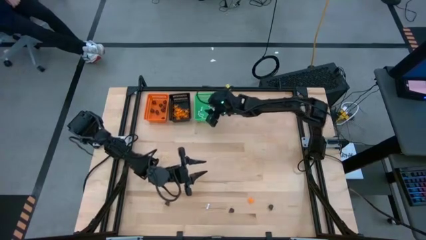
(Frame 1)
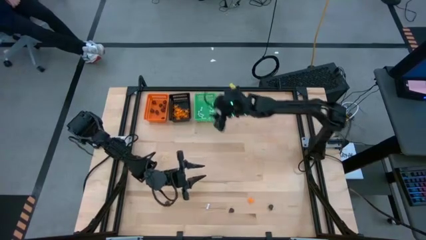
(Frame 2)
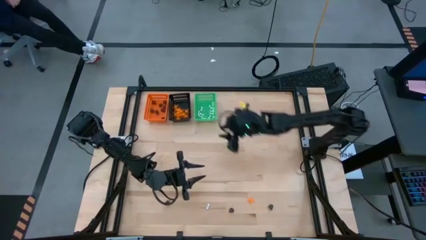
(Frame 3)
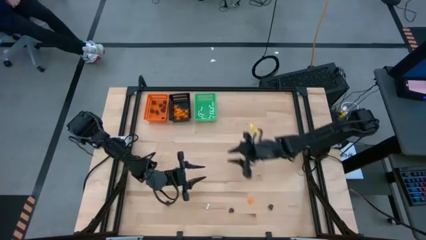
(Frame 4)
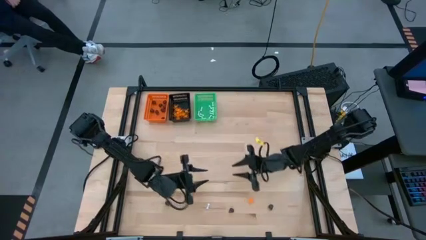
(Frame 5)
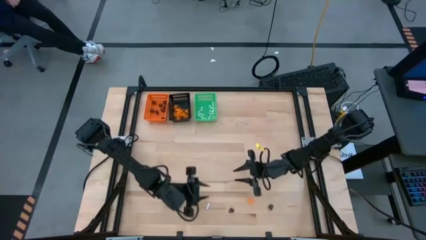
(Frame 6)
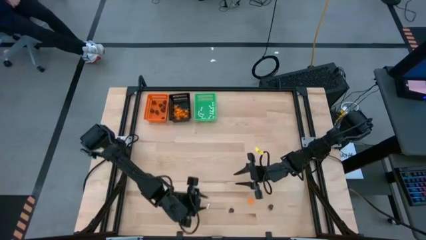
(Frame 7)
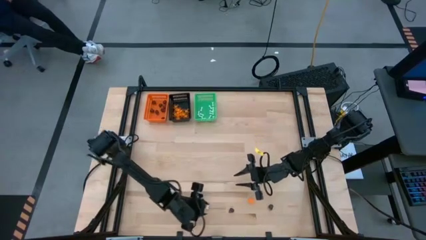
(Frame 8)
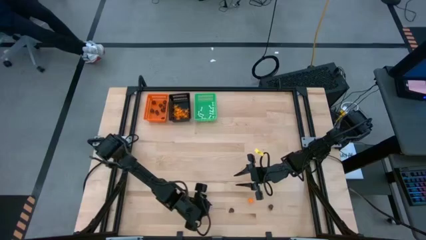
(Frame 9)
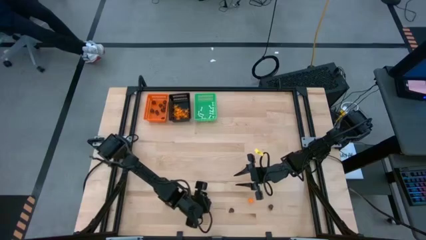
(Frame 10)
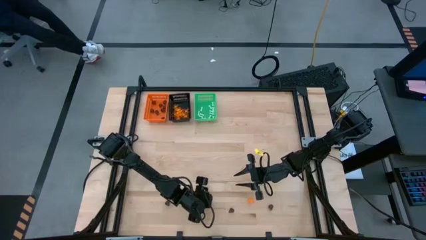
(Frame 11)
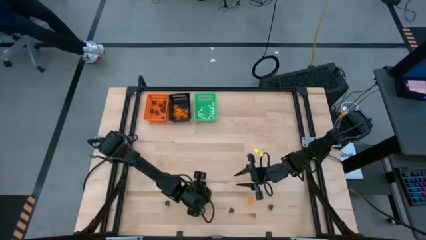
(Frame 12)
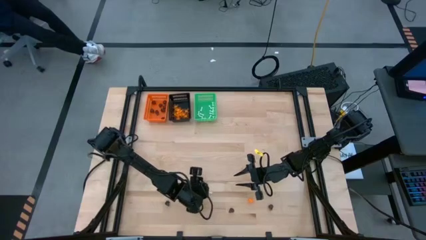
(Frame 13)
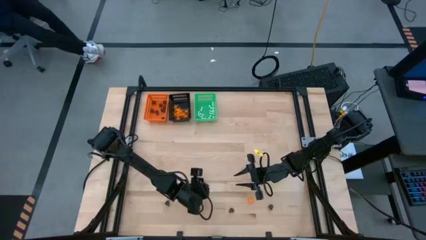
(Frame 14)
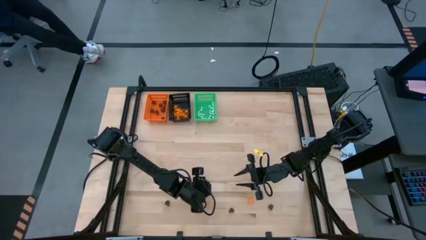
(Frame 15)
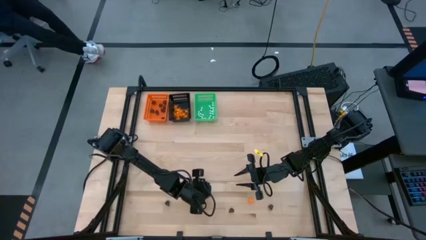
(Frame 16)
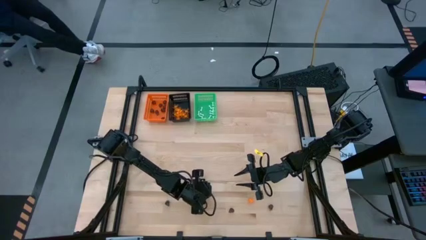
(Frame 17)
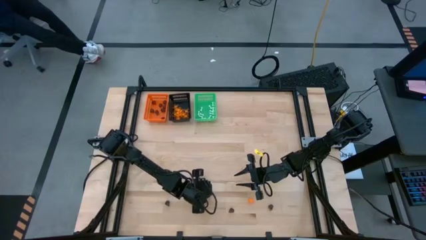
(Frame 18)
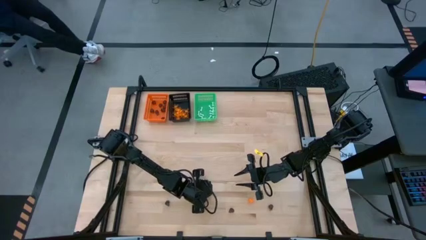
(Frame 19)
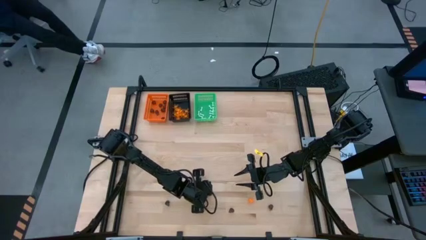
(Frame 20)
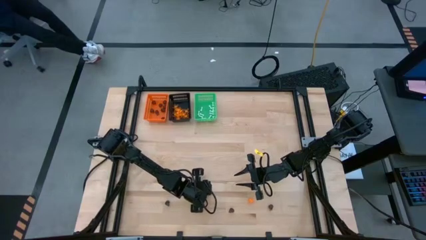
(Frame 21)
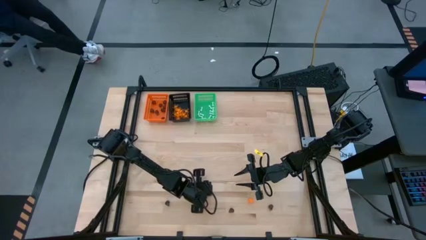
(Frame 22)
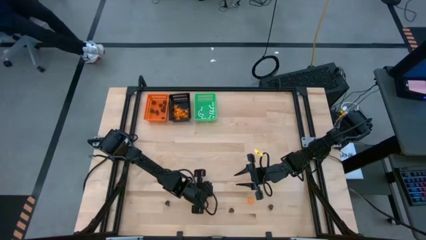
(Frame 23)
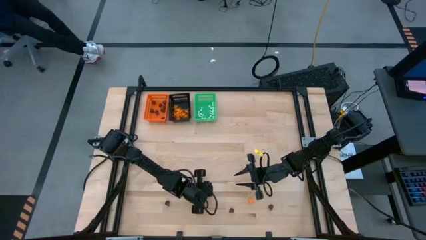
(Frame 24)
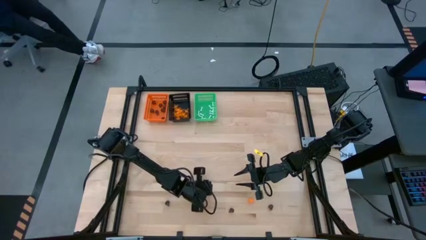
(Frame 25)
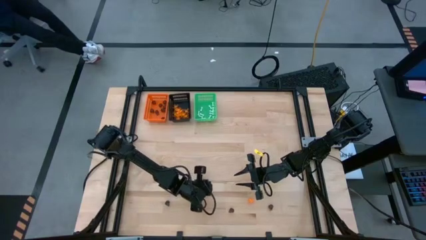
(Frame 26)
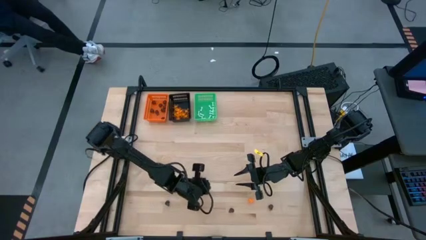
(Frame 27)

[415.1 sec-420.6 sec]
Task: Sort Halloween decoration
Put the white bone toy into the green bin

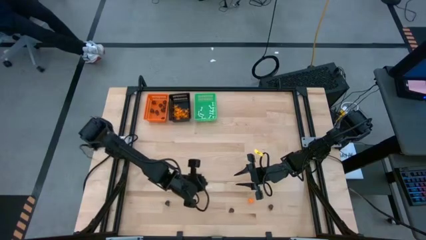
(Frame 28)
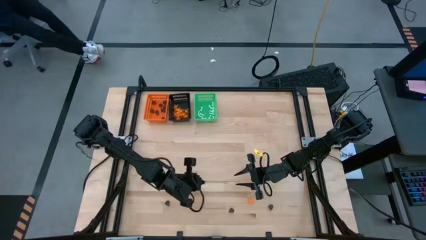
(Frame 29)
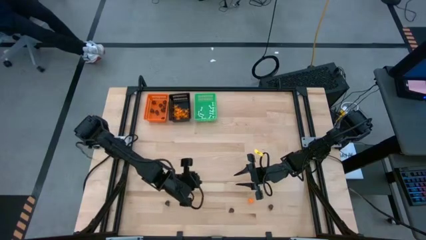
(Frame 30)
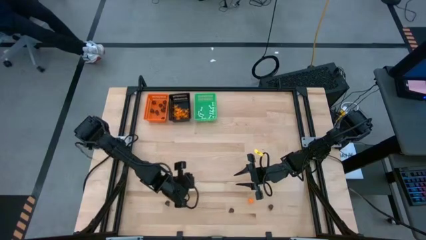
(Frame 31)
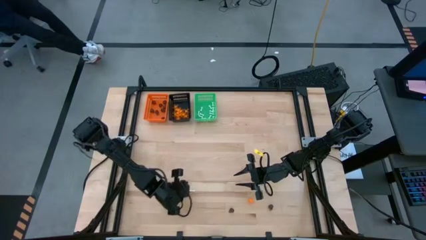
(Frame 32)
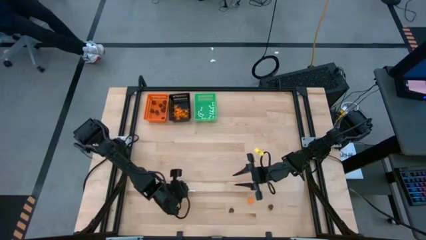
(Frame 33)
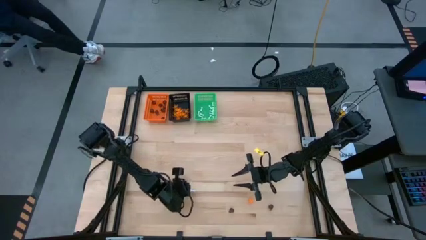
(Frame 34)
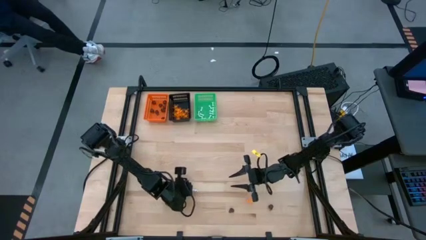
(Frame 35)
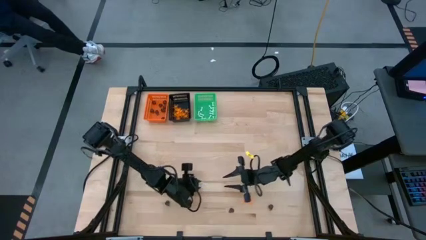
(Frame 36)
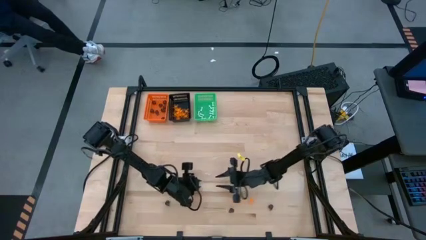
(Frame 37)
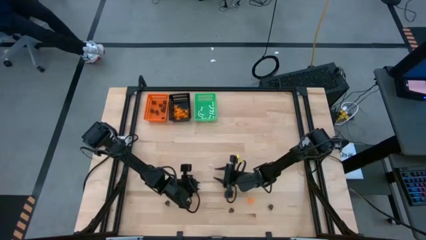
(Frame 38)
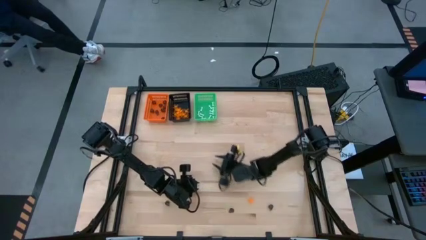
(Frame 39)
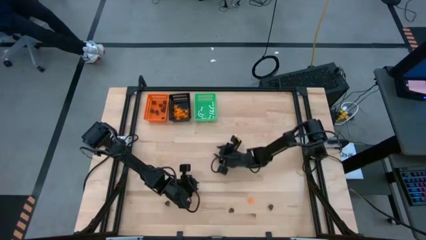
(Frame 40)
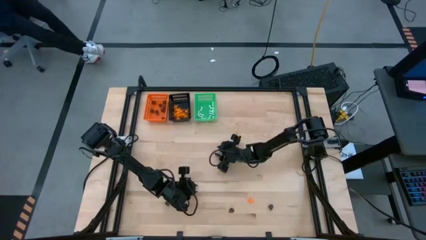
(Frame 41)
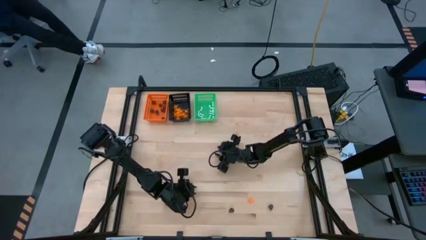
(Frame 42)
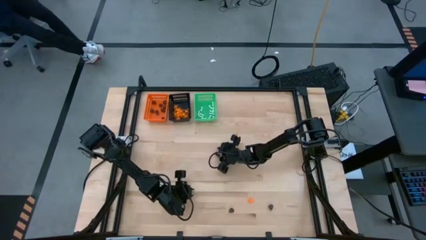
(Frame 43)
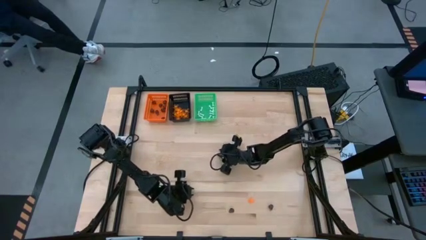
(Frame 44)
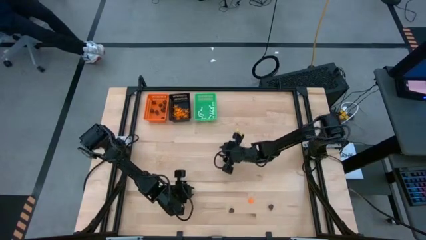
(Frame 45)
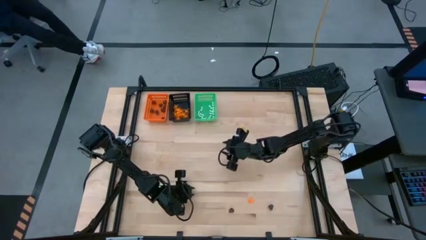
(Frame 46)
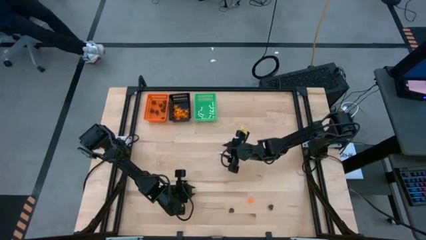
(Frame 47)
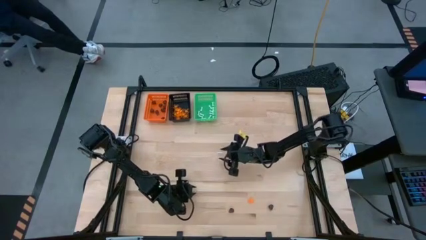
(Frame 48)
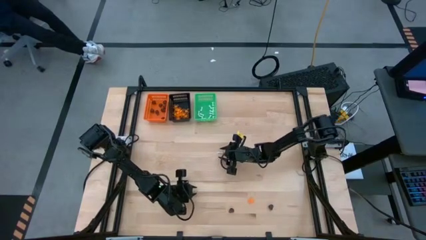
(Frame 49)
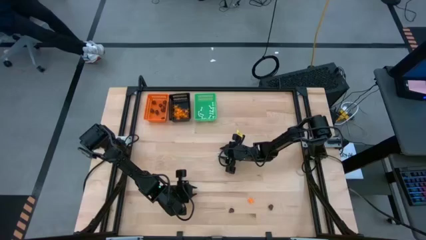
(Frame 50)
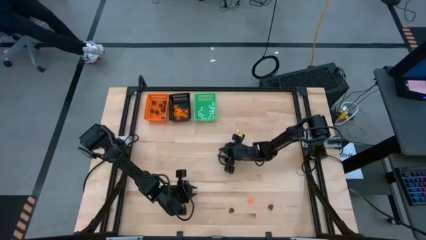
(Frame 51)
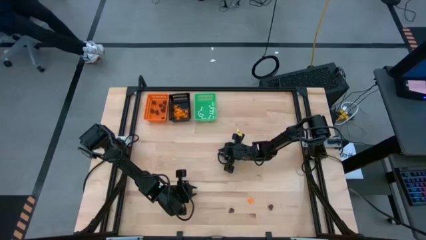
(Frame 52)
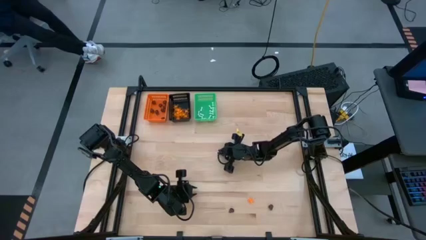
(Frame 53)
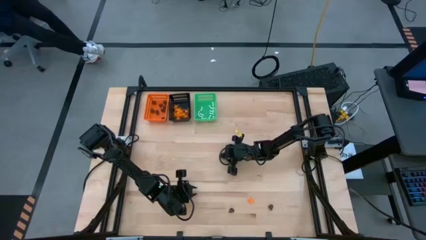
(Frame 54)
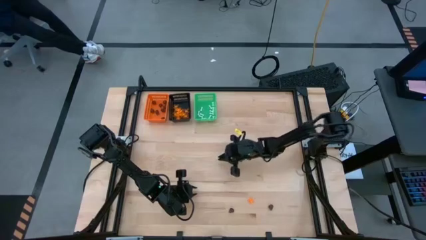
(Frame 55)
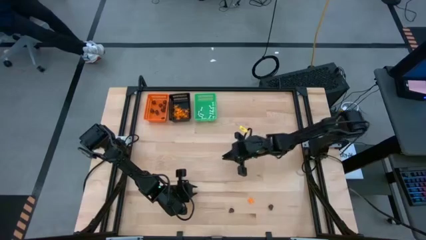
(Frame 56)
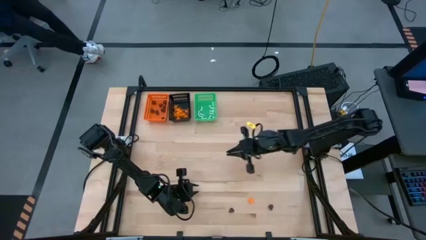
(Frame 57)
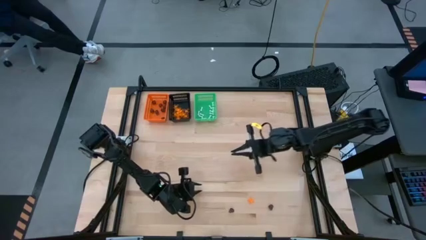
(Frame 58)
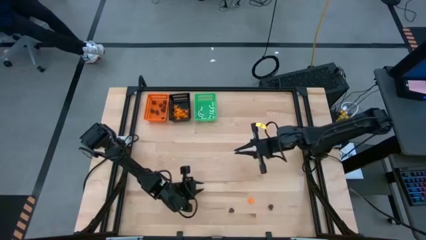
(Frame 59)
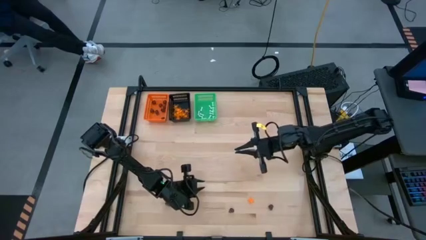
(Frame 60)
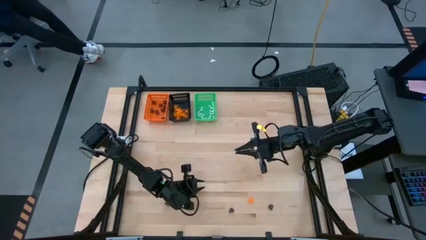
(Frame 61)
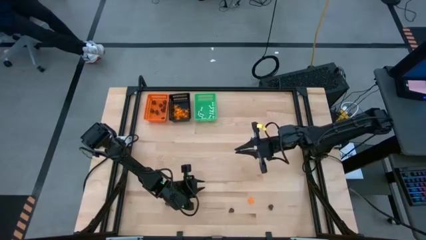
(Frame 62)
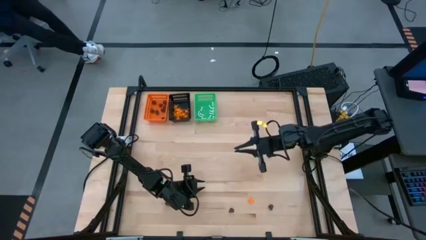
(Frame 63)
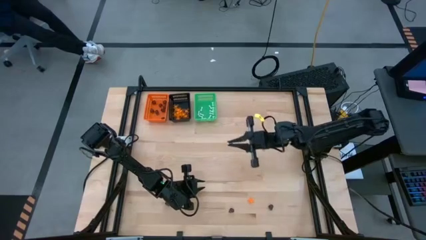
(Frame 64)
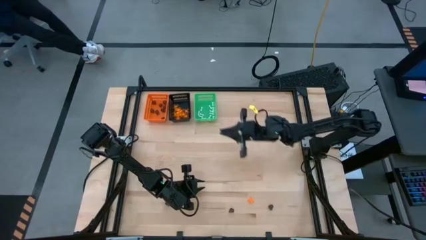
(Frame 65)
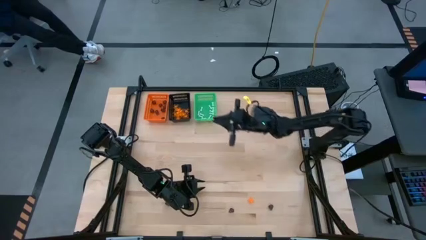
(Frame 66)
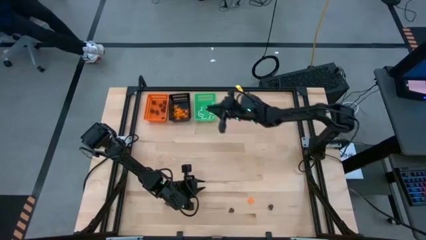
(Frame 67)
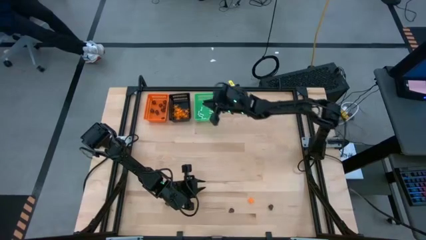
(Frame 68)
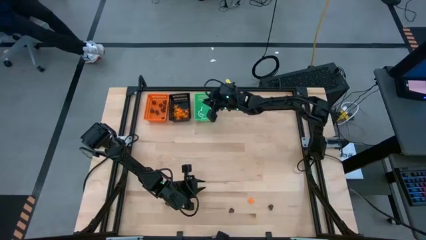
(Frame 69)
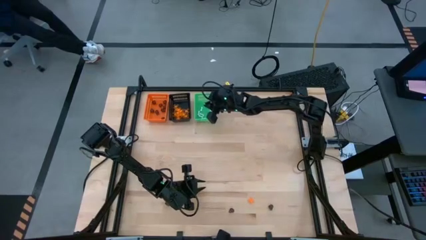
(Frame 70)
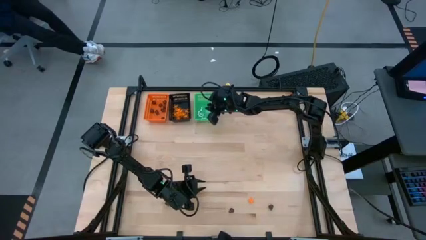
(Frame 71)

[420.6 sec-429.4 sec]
Put the white bone toy into the green bin

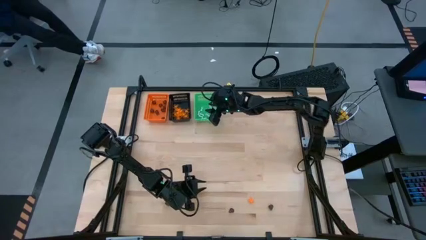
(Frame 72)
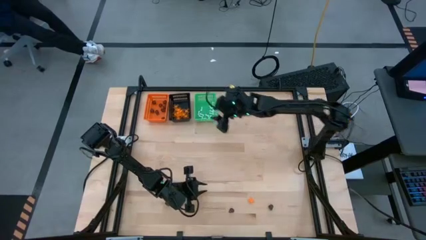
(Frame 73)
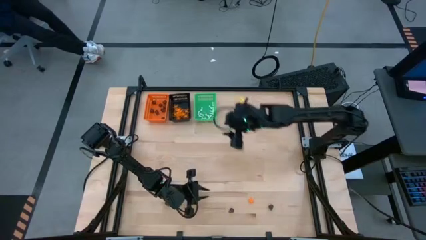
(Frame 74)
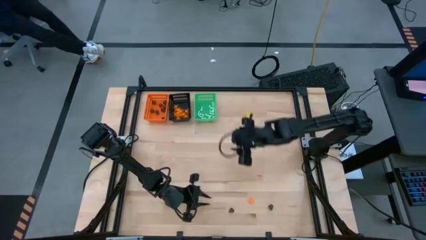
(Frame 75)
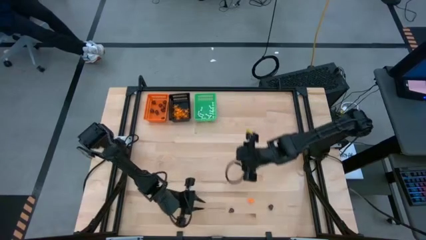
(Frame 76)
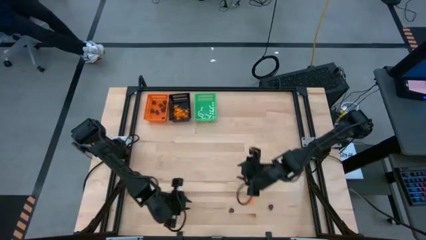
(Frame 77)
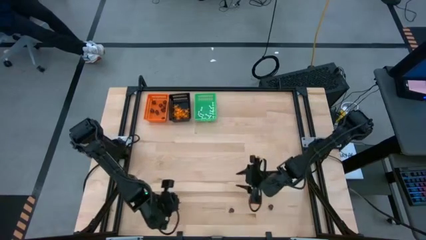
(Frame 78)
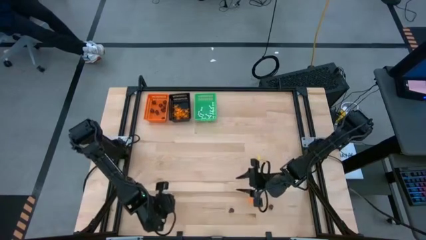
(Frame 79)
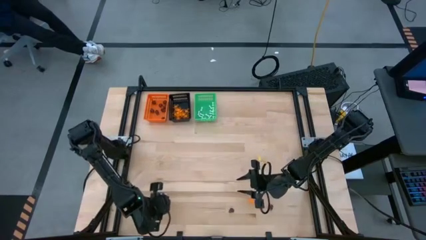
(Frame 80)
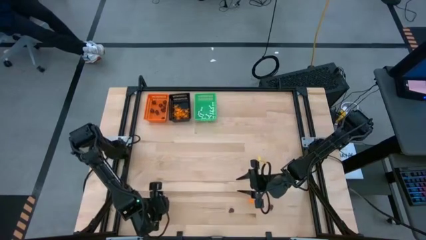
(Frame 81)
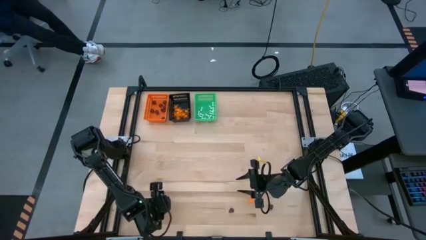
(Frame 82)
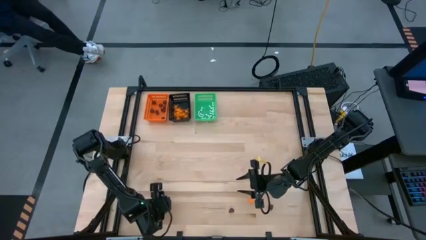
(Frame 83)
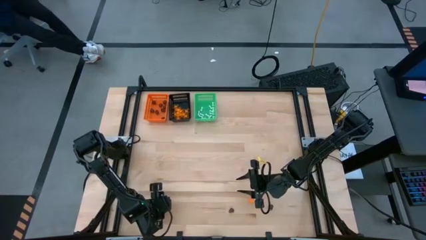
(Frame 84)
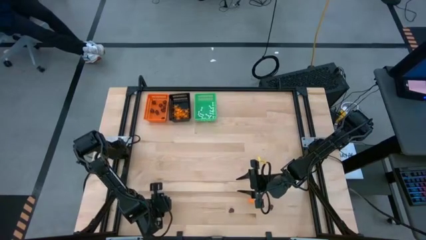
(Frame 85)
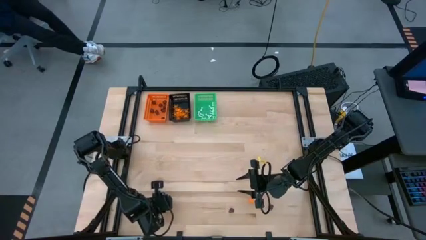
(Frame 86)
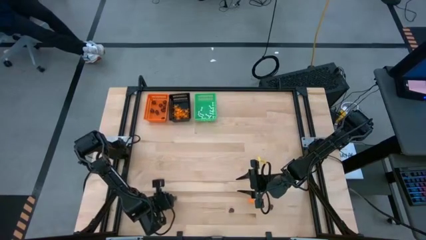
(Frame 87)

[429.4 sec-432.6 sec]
Put the black skull toy into the orange bin
